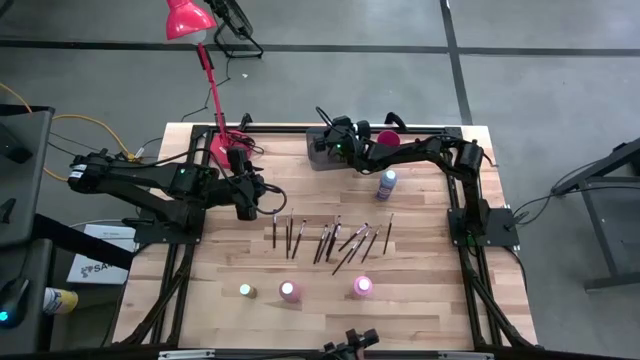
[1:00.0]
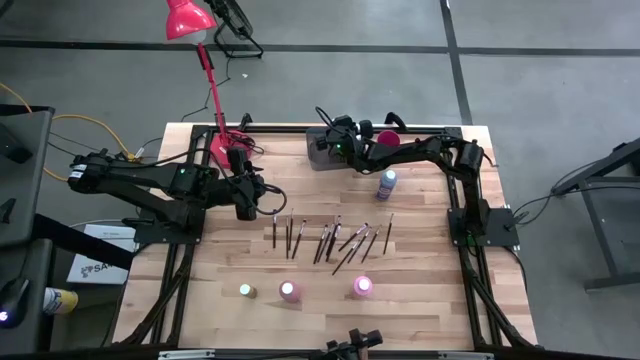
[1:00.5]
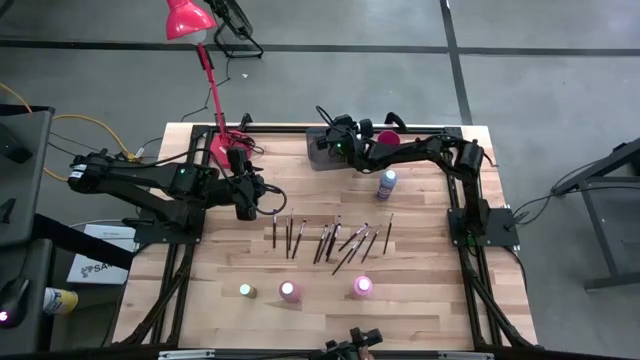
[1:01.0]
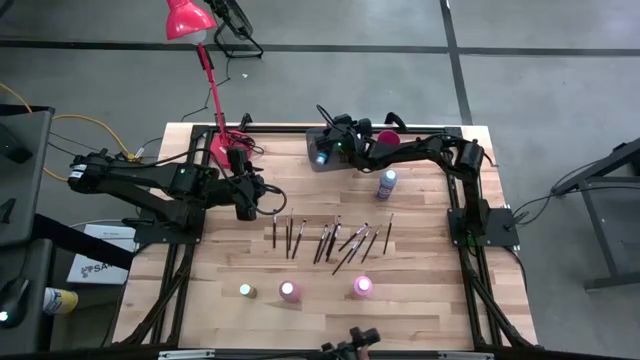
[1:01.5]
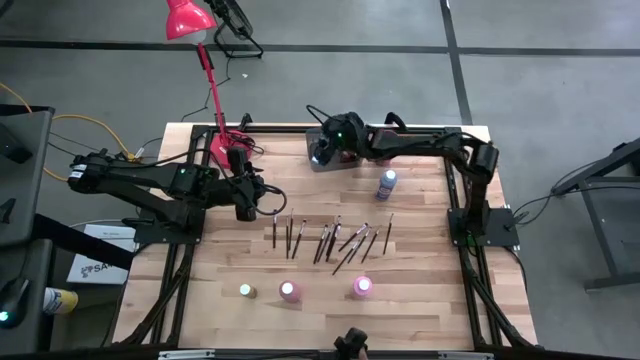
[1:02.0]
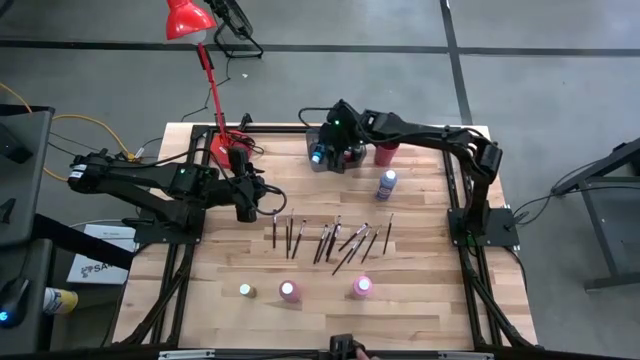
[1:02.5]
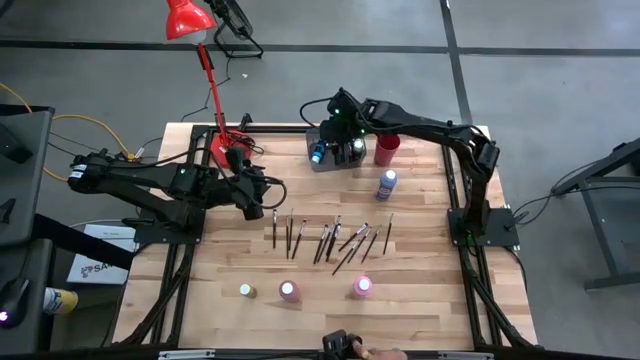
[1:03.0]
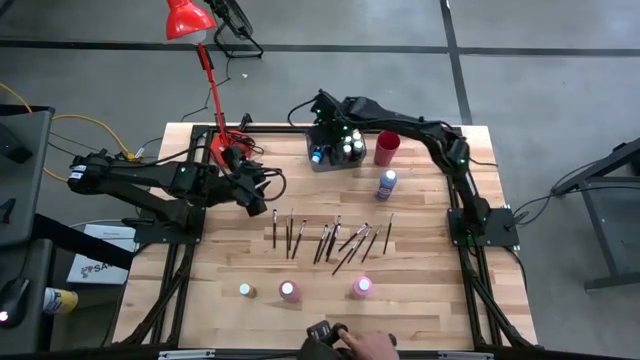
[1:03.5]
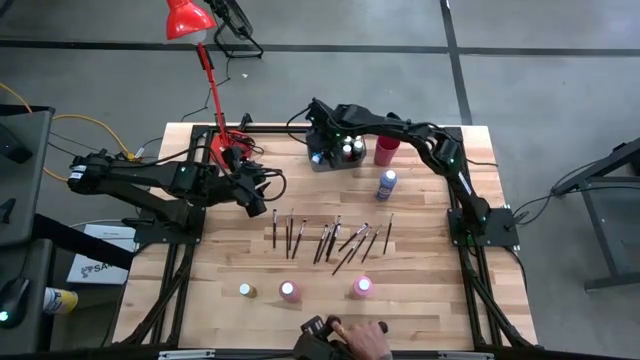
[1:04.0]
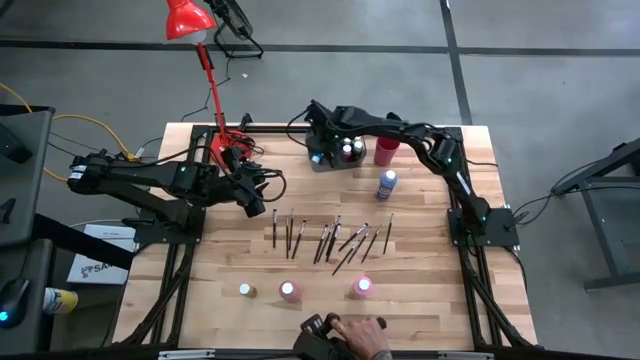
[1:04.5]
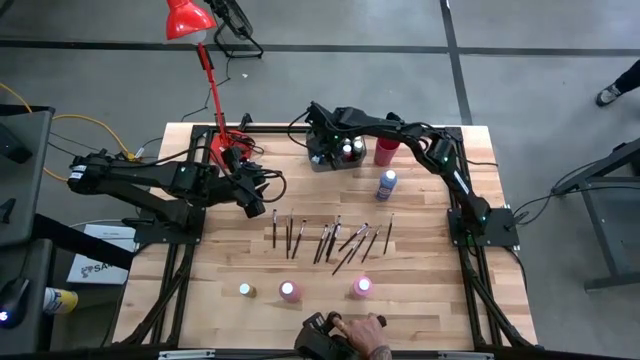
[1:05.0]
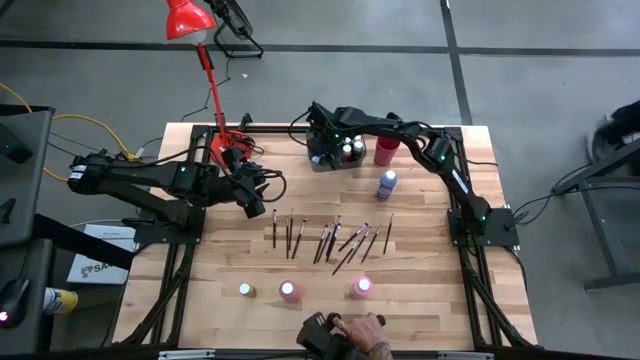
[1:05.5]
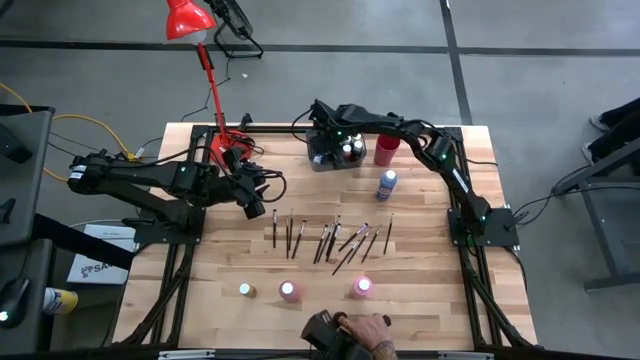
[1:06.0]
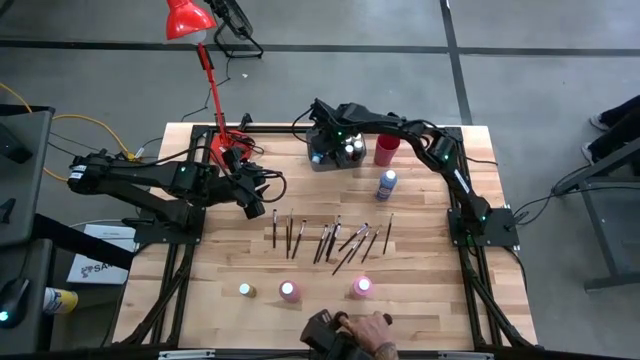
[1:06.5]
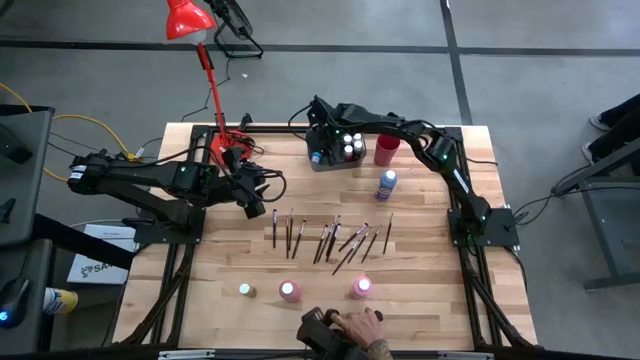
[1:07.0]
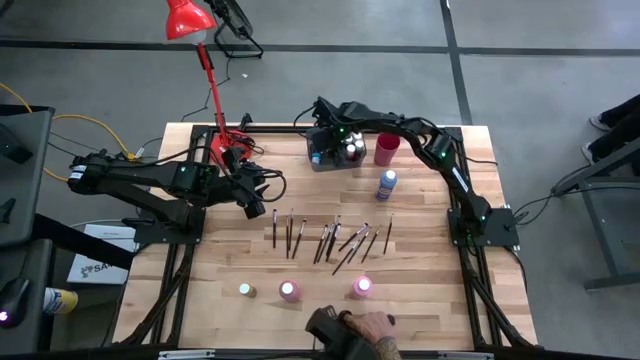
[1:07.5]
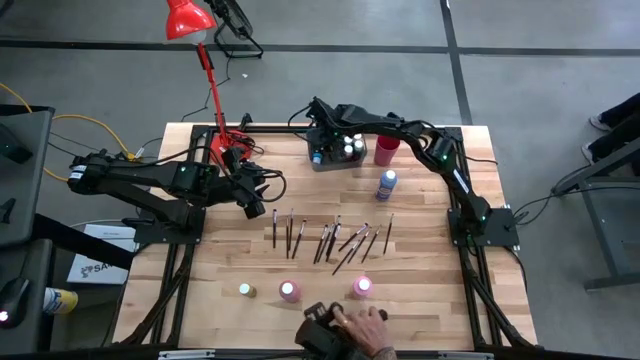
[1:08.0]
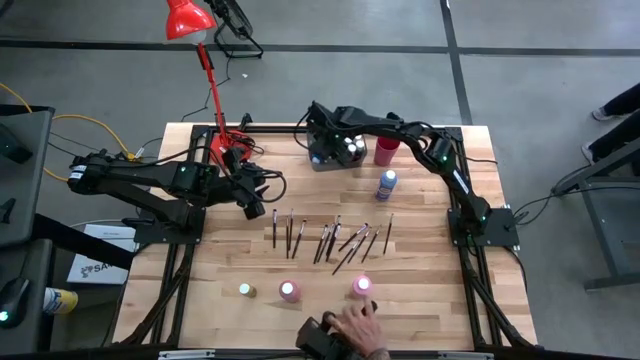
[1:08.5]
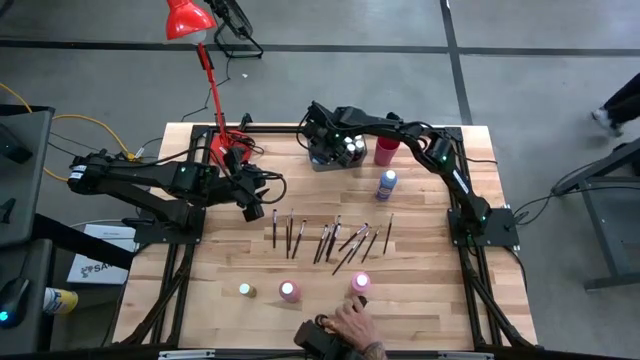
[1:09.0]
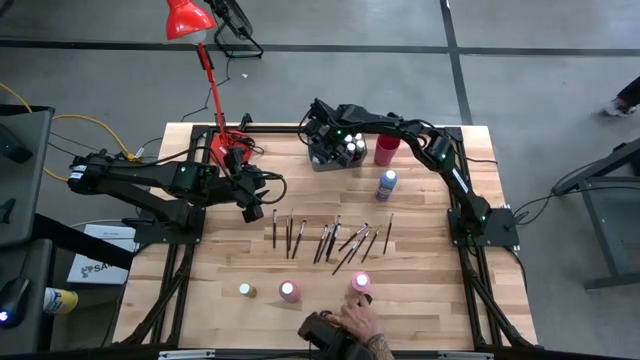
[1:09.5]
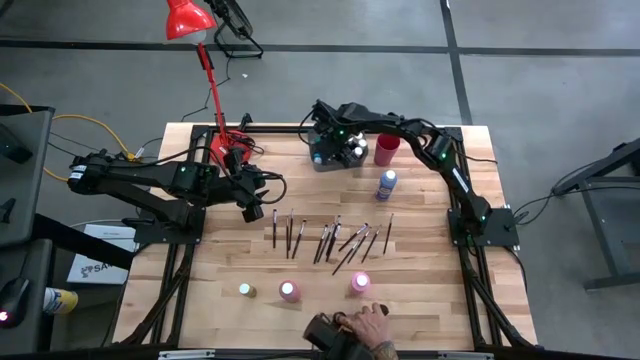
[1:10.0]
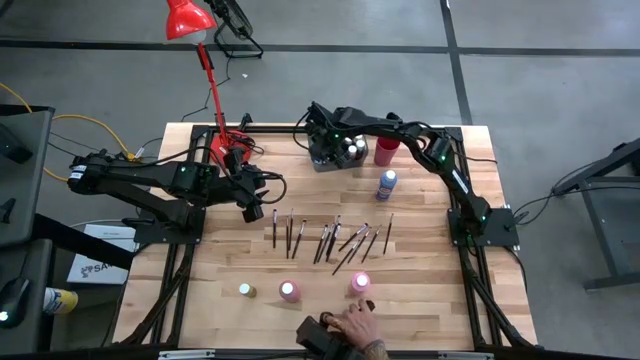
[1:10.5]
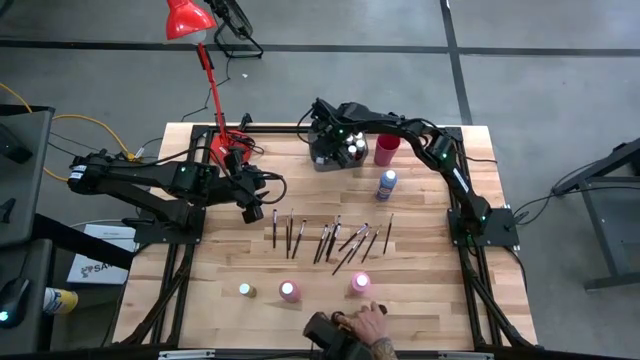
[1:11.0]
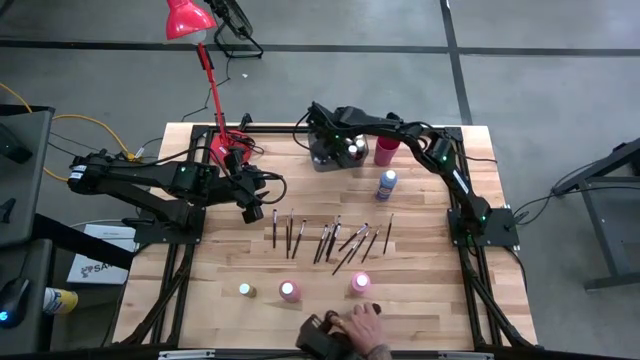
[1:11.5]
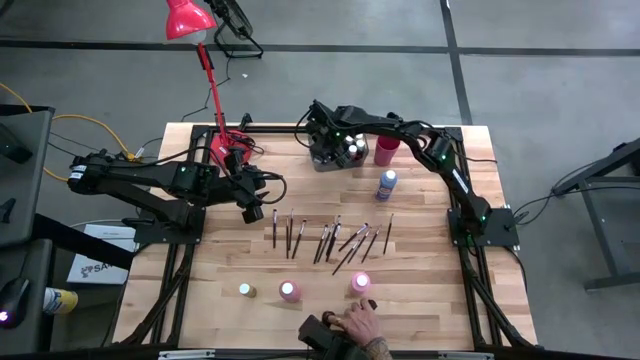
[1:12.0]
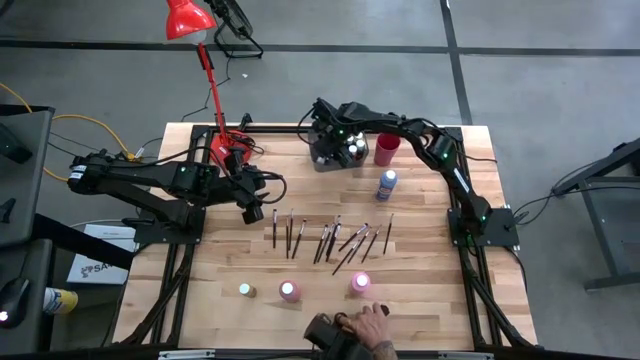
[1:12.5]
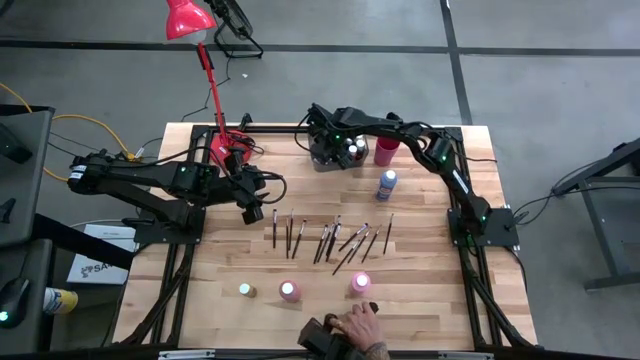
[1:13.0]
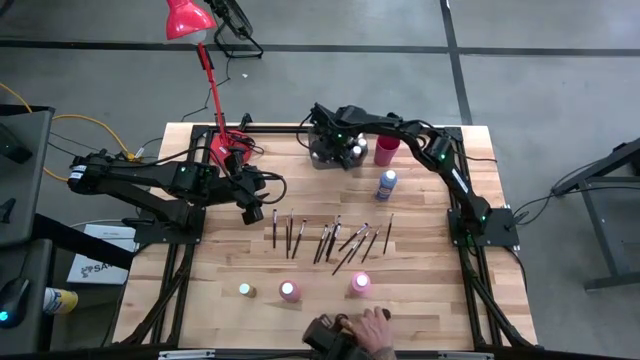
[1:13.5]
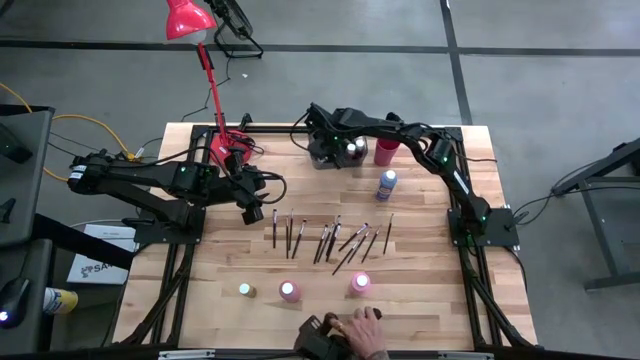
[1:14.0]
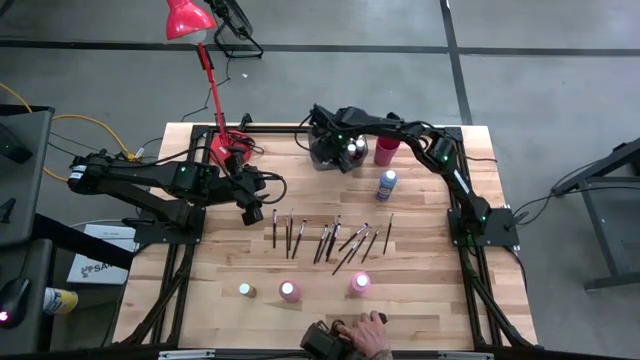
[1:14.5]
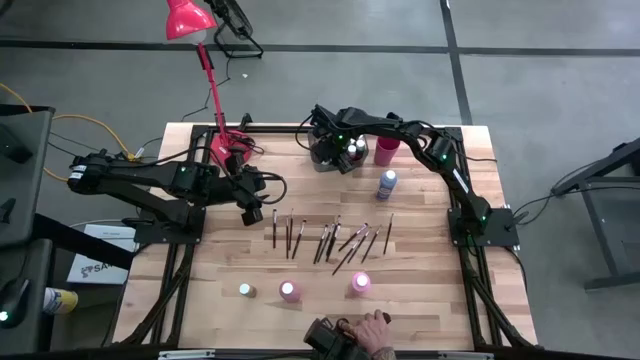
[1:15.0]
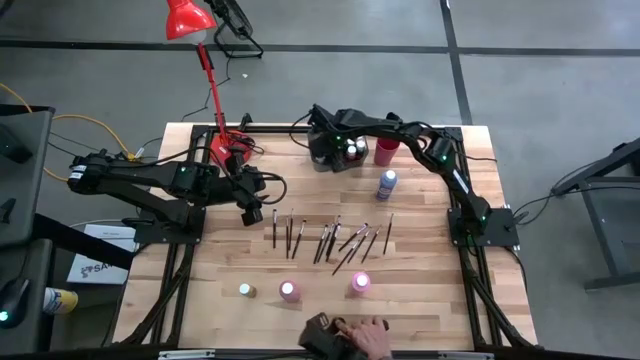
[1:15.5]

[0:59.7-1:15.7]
Task: Pick & Place Paint Supplies
Put the small light blue paint bottle into the black bin

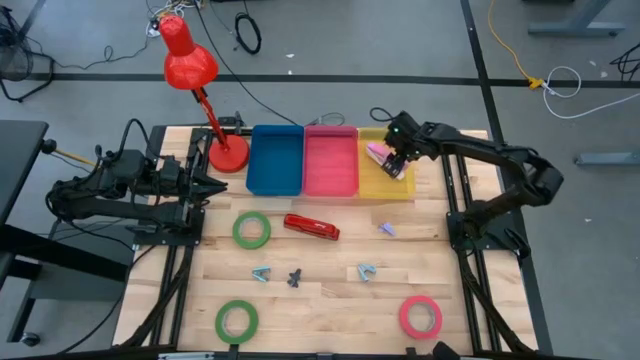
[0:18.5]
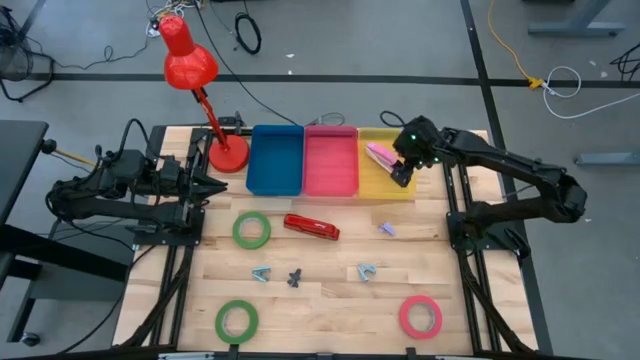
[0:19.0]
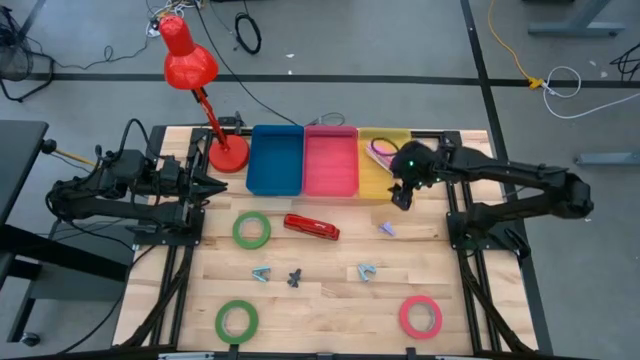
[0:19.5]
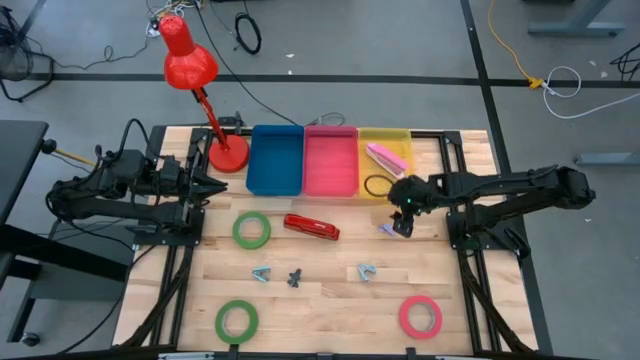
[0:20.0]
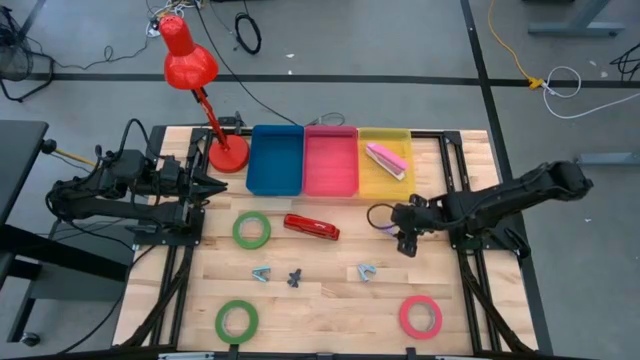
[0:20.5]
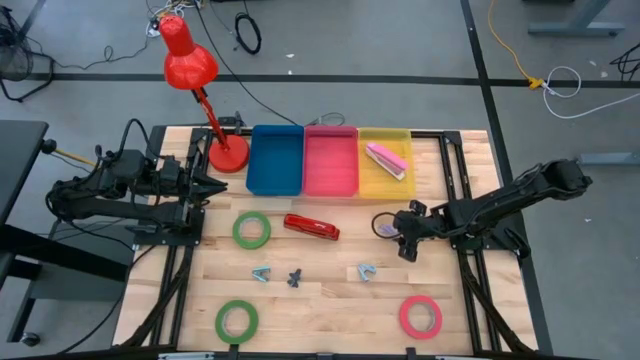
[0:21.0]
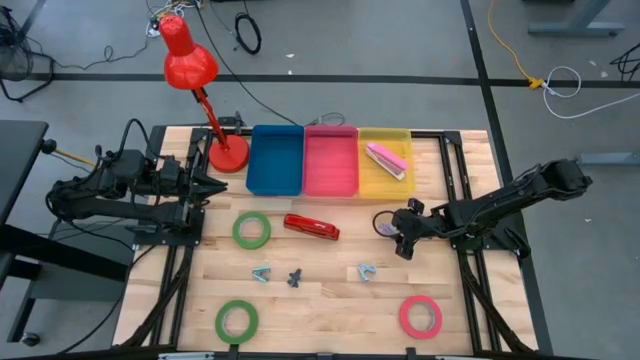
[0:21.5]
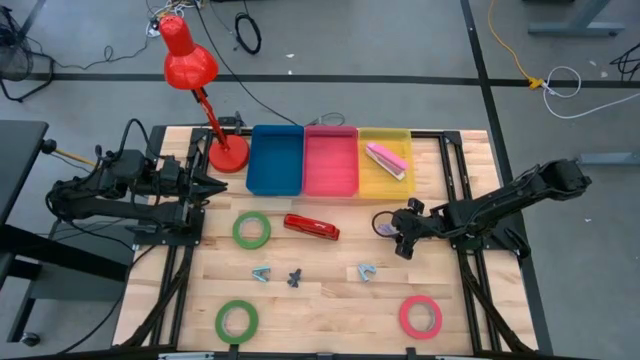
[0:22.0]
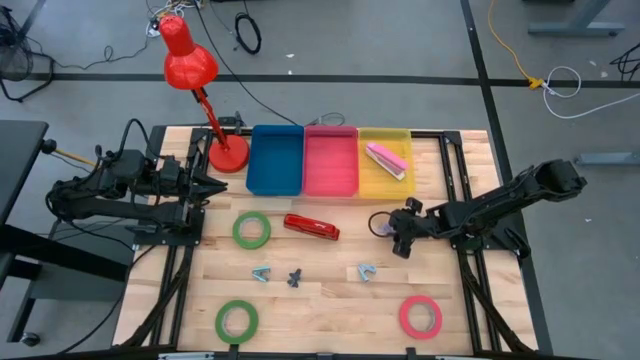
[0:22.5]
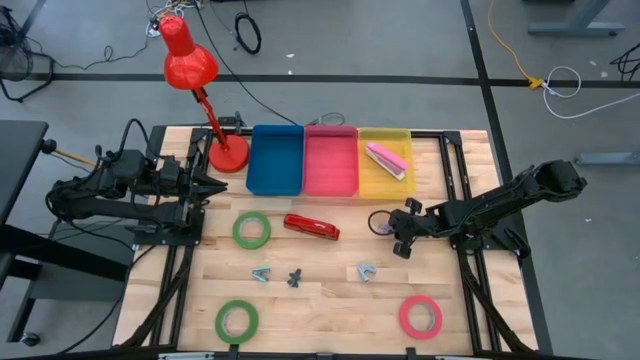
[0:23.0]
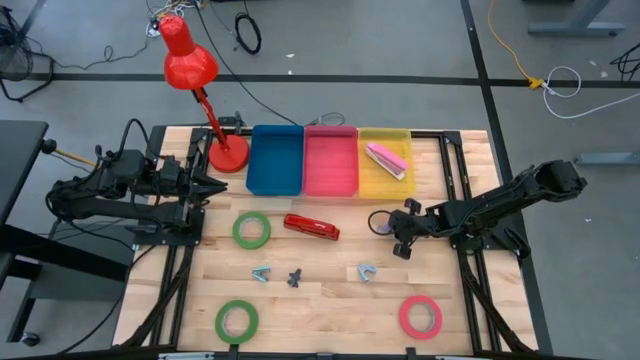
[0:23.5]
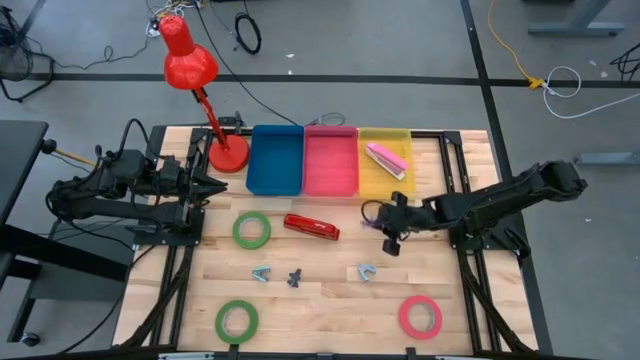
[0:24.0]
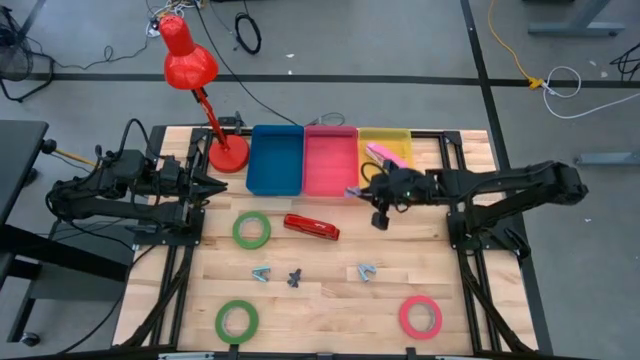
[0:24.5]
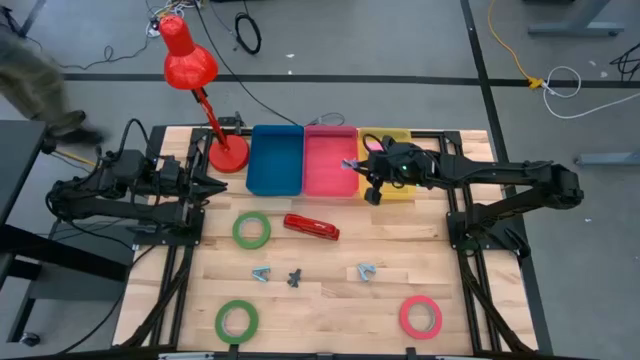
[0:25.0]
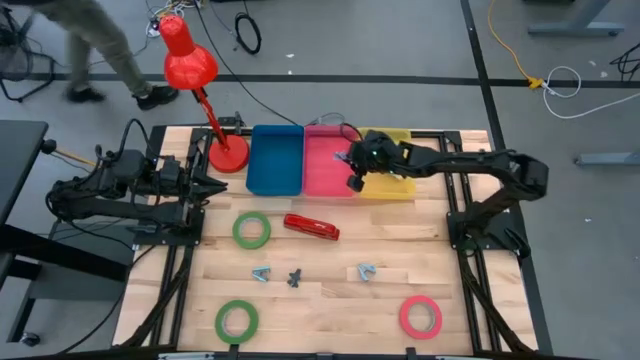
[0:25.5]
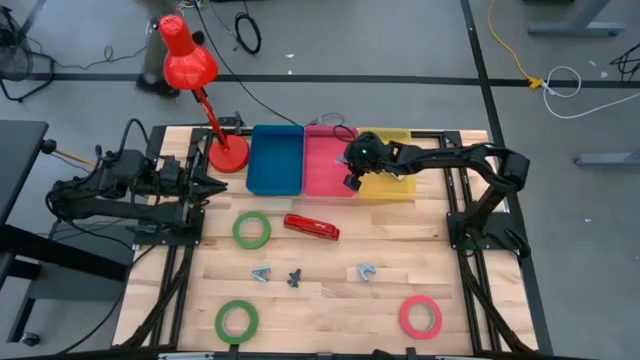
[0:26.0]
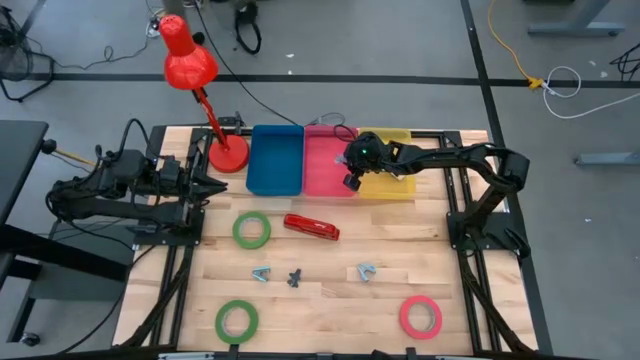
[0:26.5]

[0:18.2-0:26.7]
Task: Pick and place Stapler, Stapler remover, tape
Put the purple staple remover into the red bin
